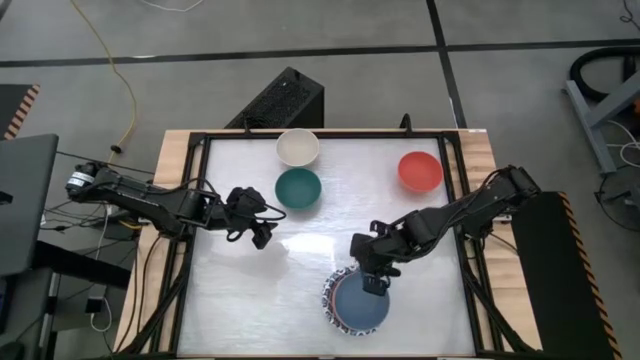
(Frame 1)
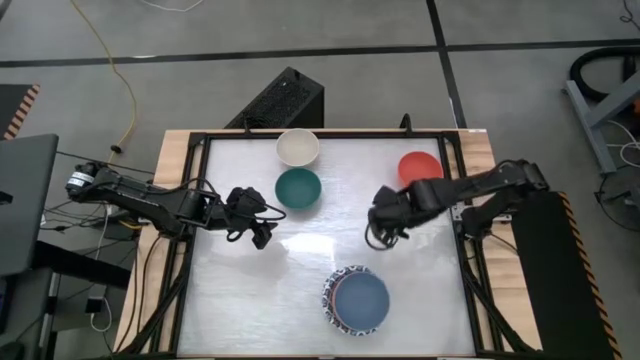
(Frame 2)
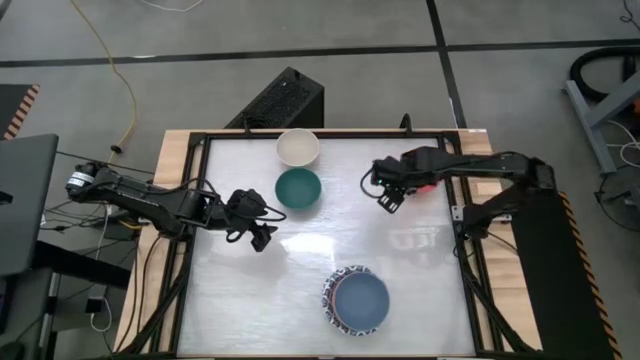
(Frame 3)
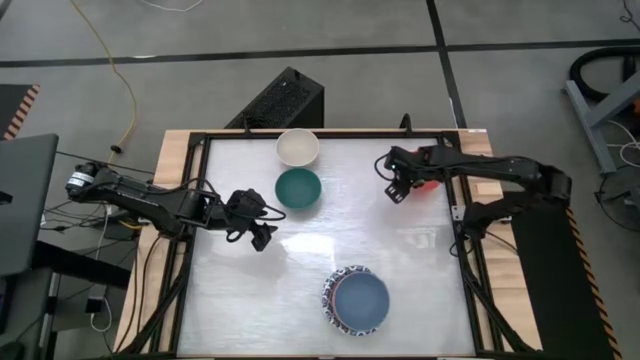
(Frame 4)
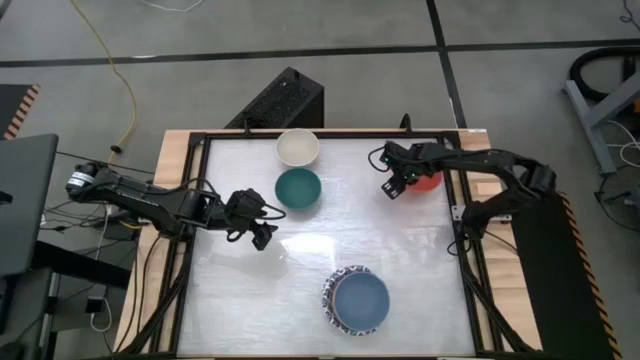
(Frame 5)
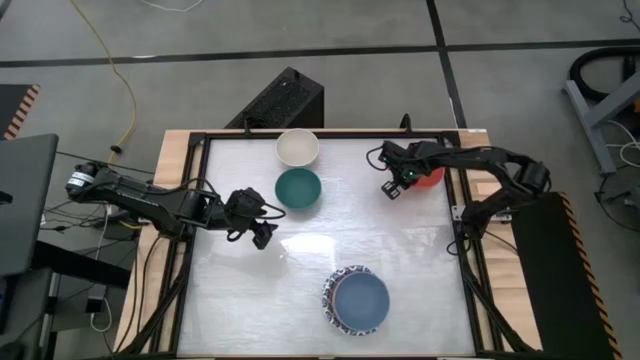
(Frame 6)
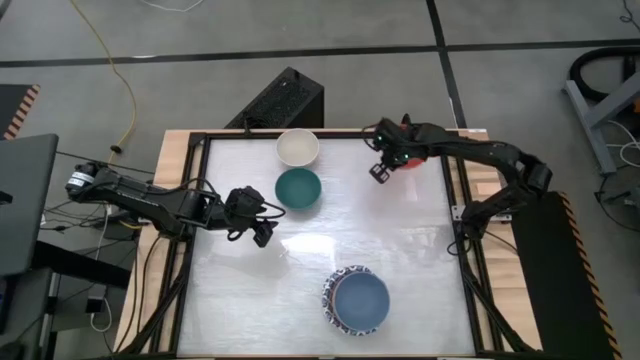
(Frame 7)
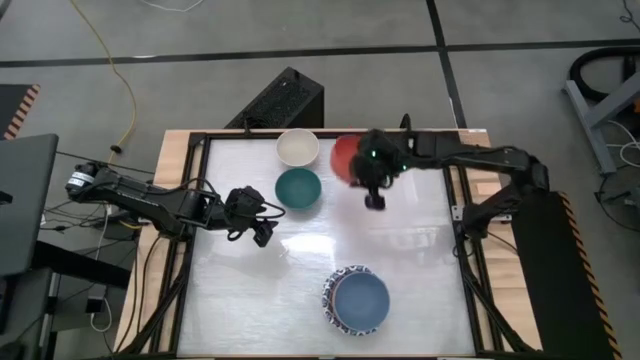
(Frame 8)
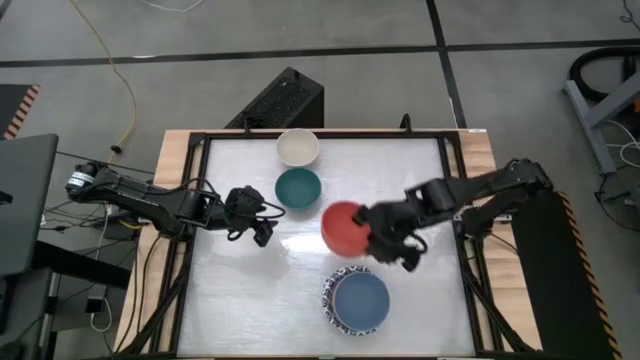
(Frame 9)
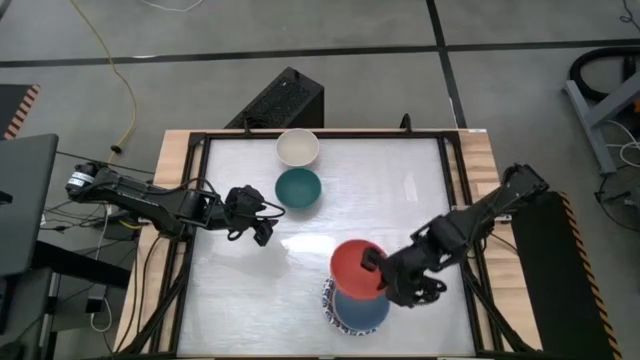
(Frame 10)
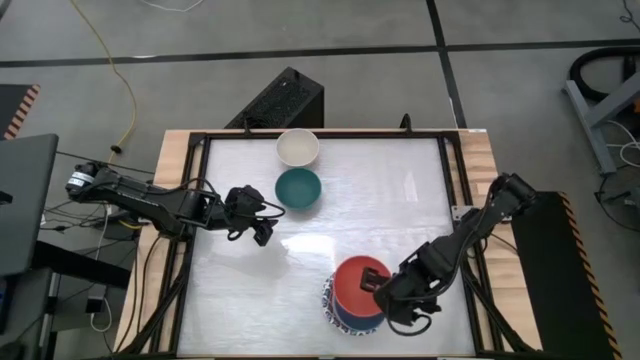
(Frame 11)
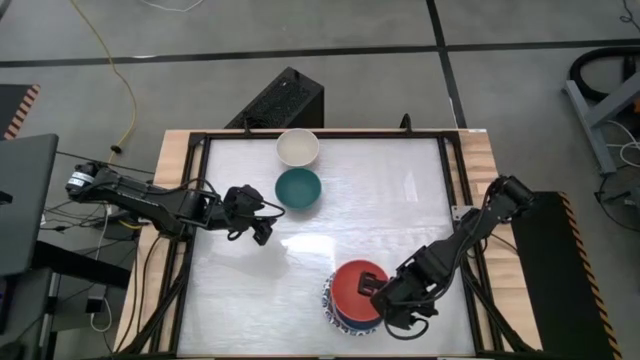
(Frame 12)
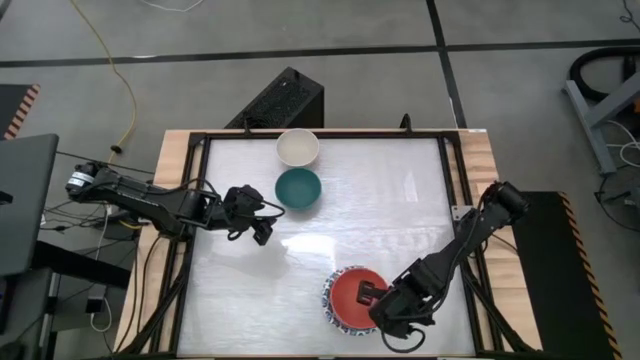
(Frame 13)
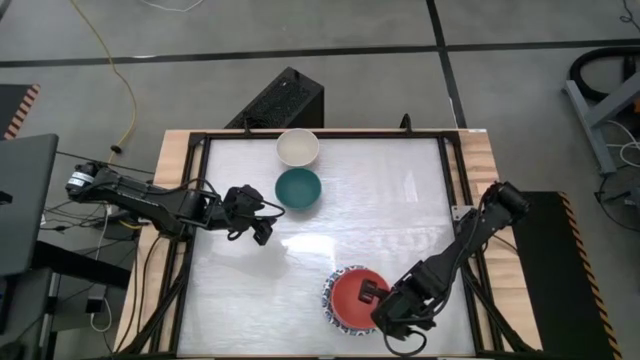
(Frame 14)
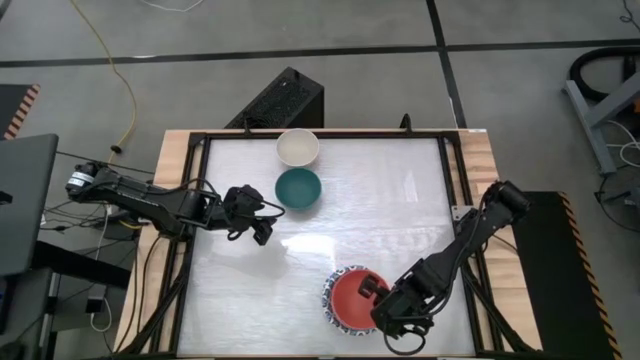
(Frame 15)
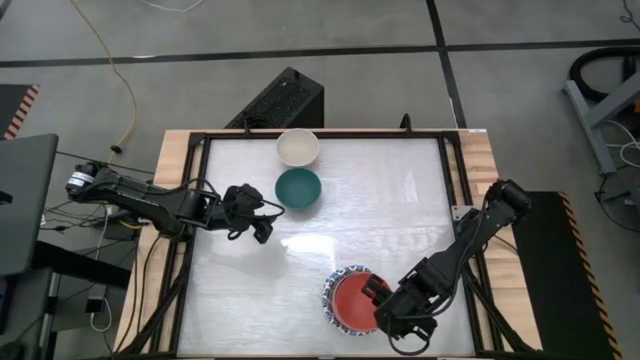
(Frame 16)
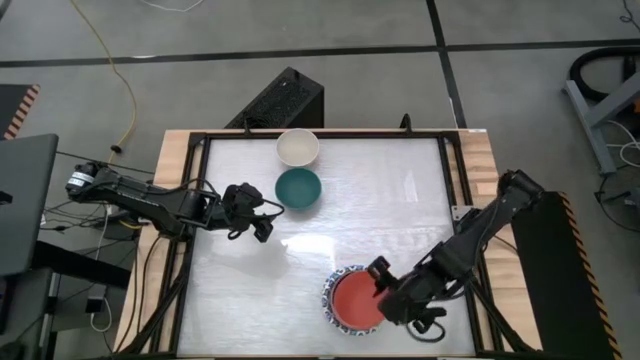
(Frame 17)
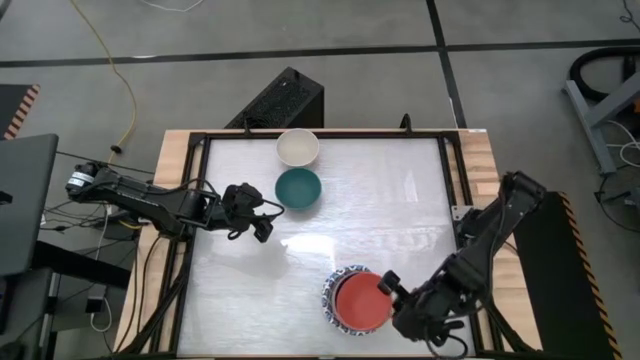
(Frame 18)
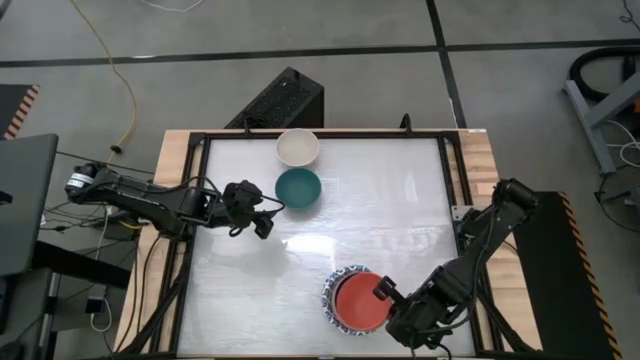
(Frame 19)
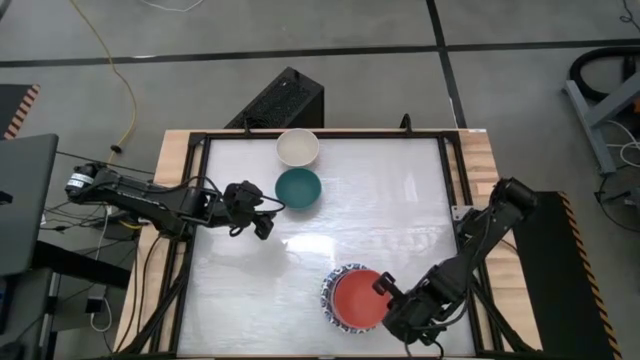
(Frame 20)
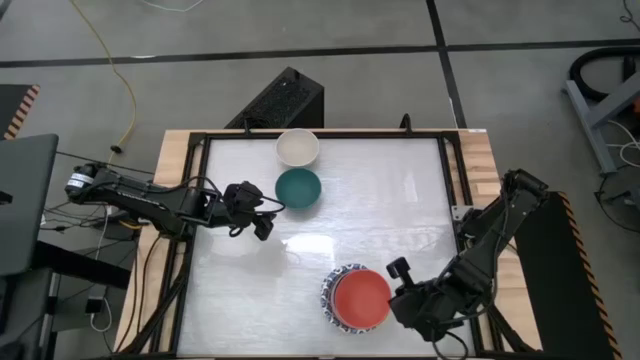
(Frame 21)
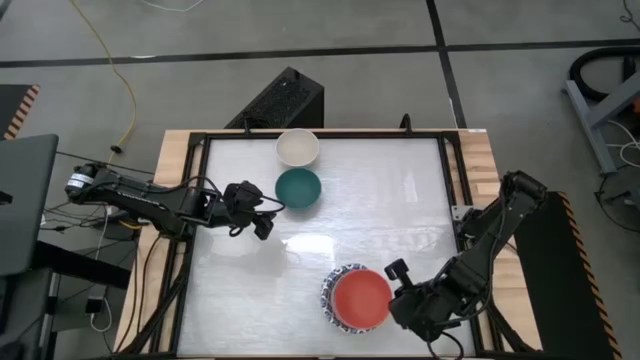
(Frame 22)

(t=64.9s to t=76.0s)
Stack the orange bowl on top of the blue bowl

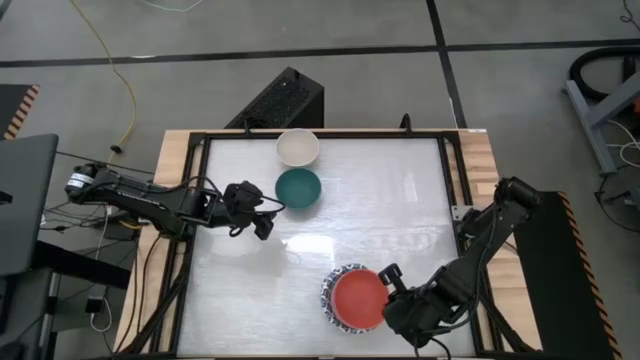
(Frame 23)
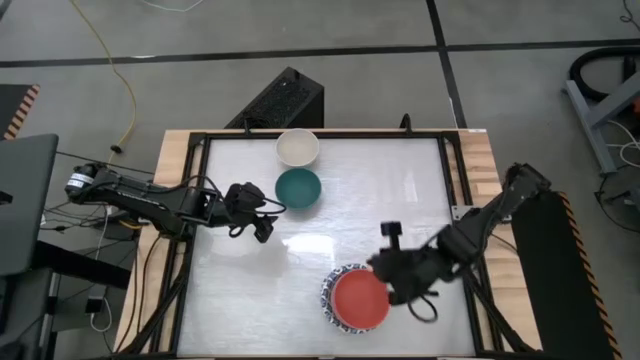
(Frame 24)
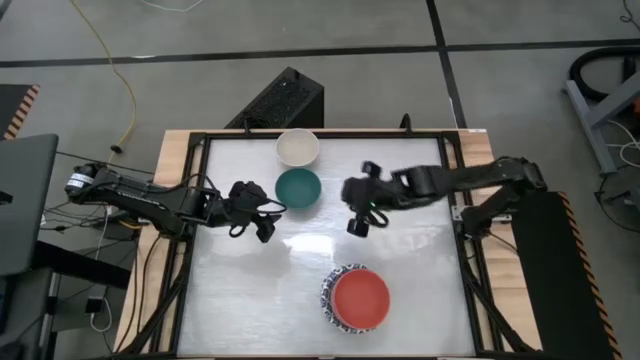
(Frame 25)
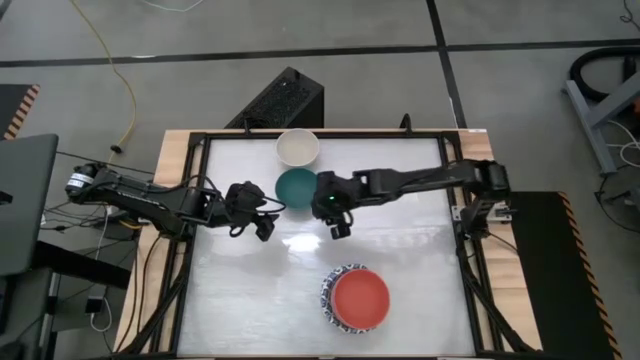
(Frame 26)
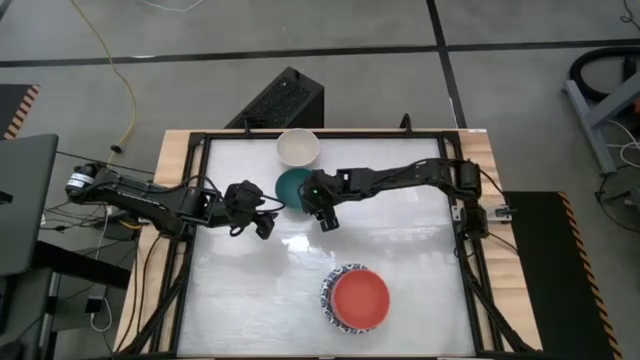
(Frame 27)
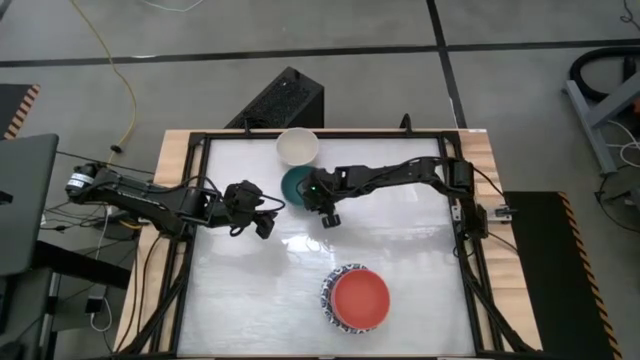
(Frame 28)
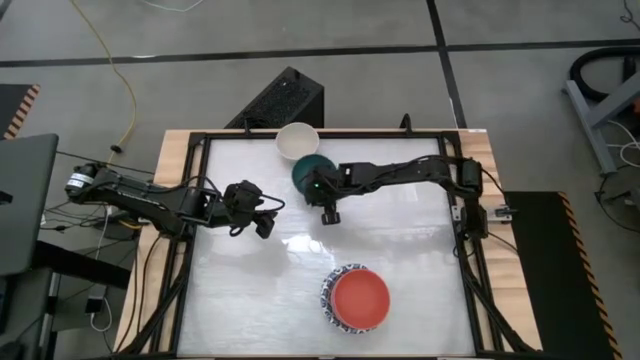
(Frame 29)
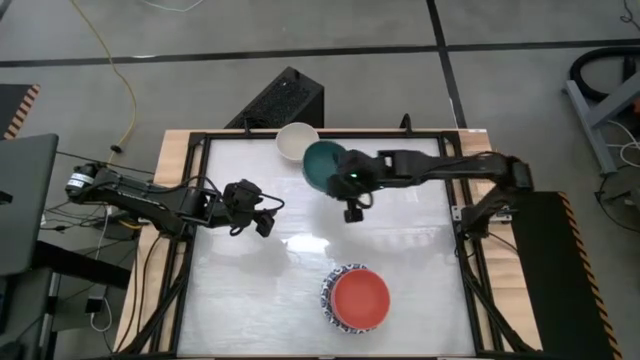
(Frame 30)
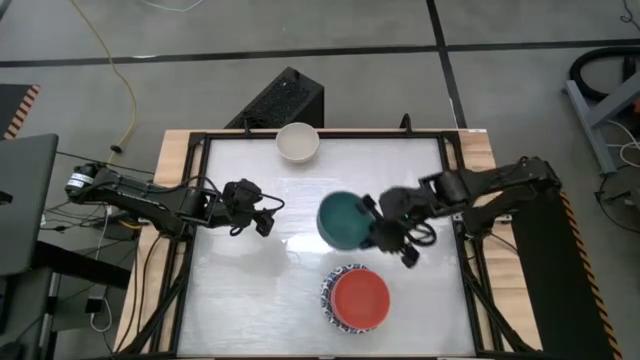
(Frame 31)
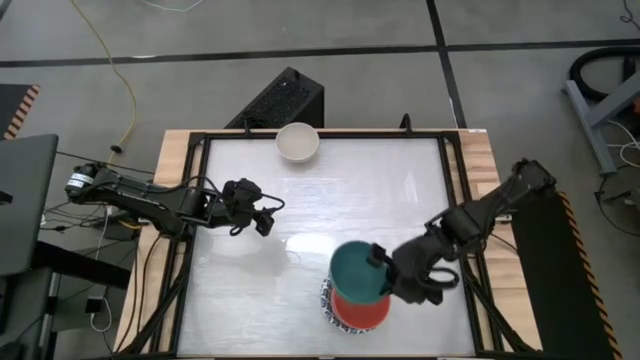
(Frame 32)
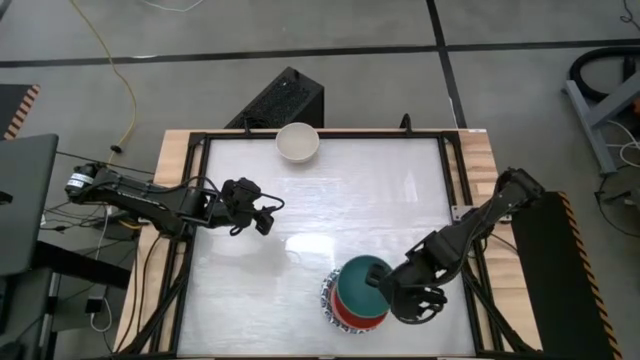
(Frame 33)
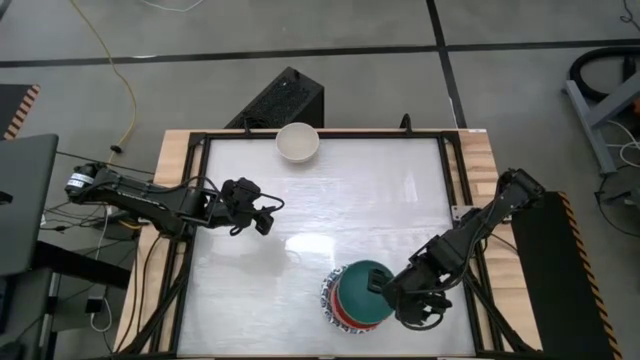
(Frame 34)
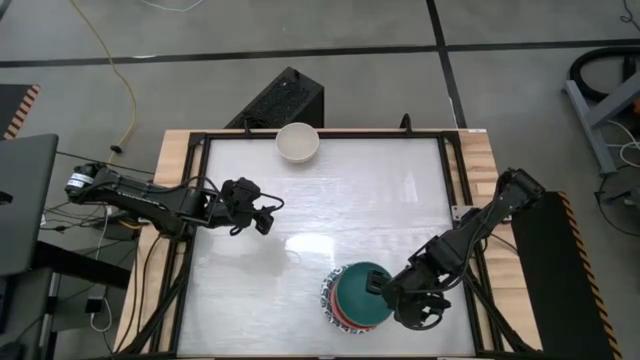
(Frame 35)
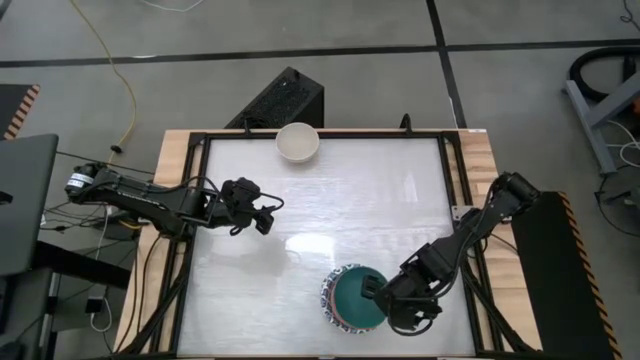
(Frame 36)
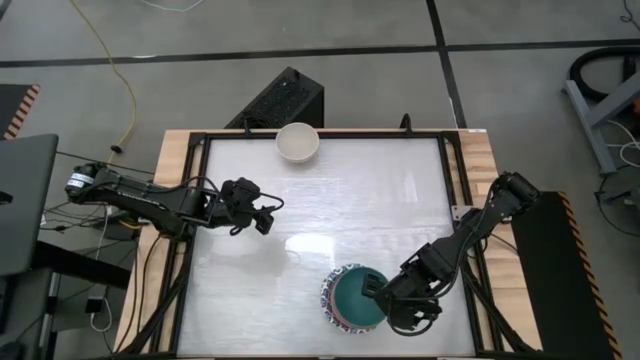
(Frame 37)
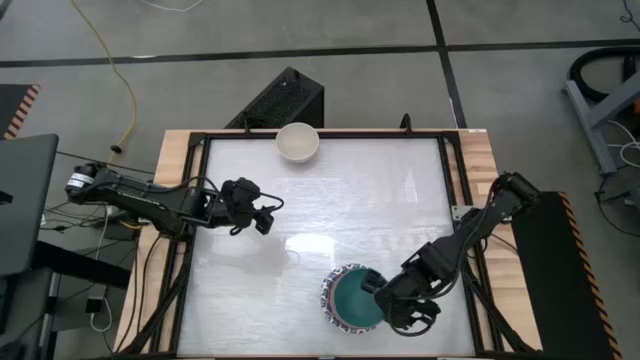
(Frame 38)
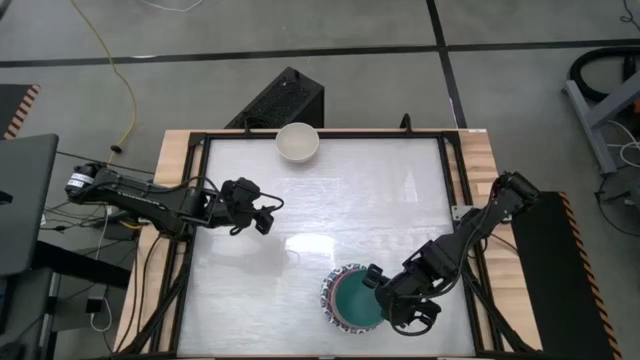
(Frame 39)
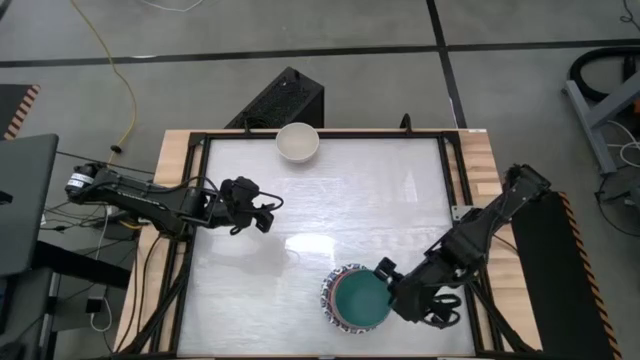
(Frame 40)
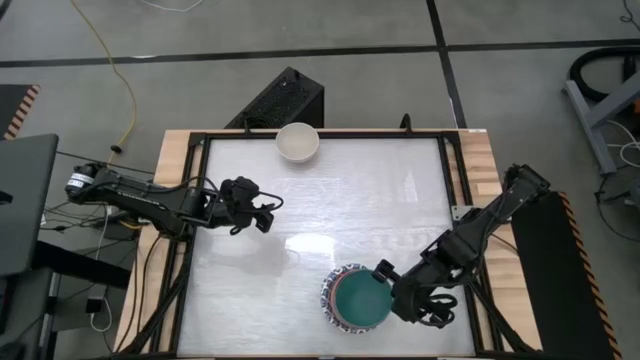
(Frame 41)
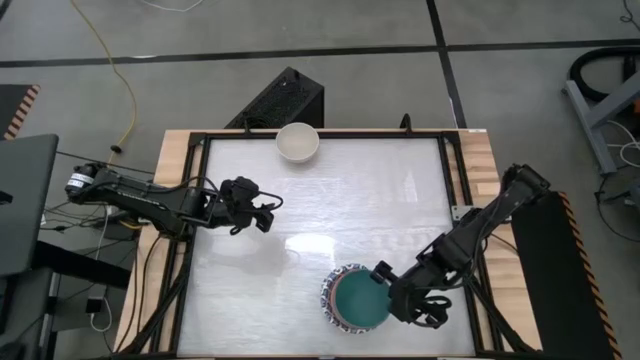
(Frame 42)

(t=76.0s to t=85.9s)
Stack the green bowl on top of the orange bowl
